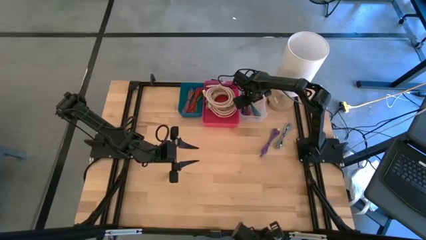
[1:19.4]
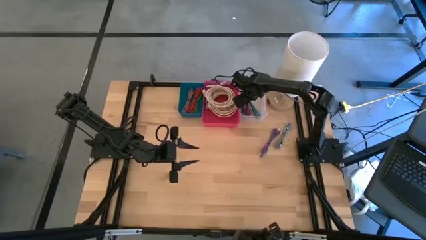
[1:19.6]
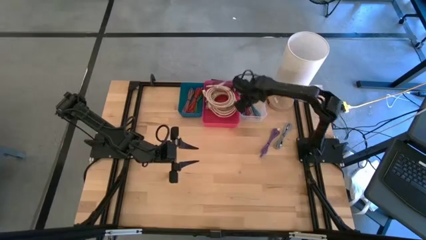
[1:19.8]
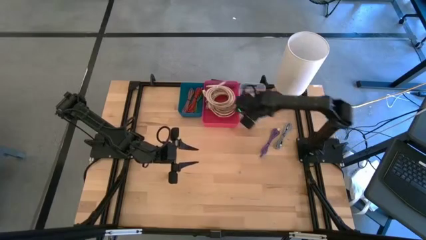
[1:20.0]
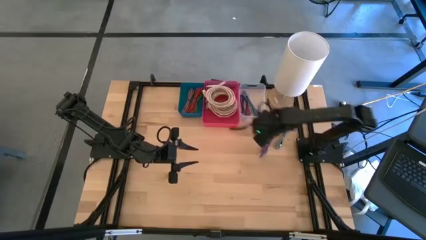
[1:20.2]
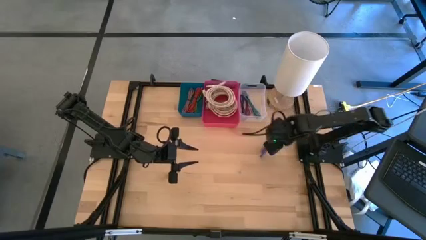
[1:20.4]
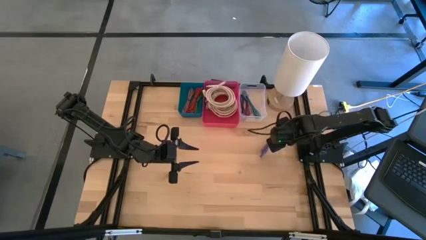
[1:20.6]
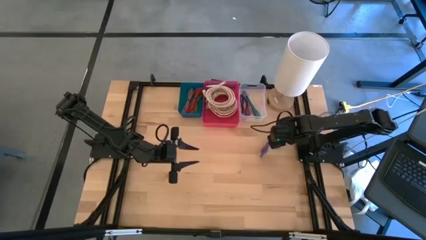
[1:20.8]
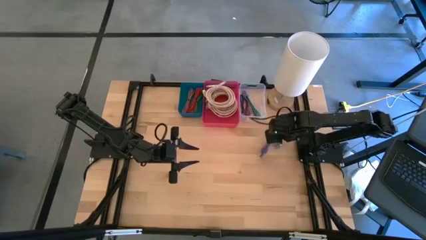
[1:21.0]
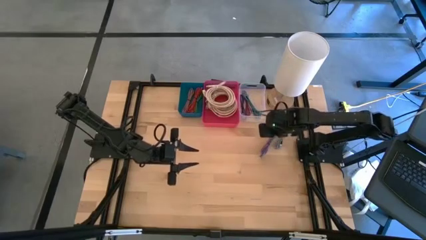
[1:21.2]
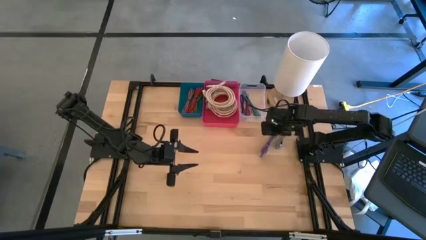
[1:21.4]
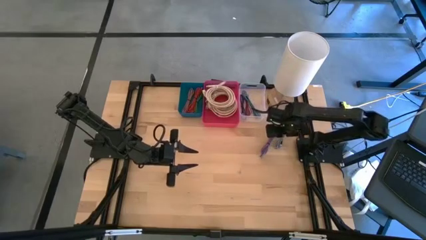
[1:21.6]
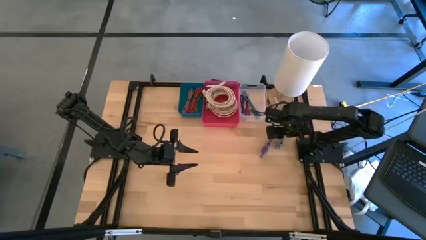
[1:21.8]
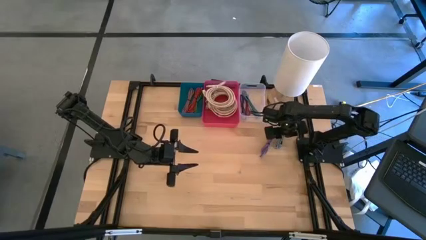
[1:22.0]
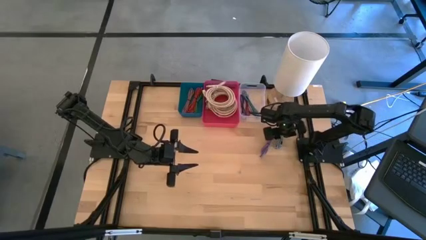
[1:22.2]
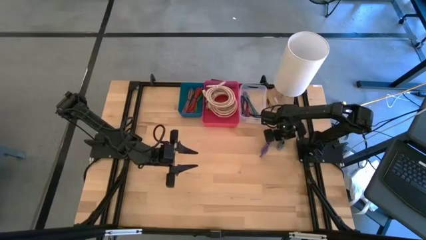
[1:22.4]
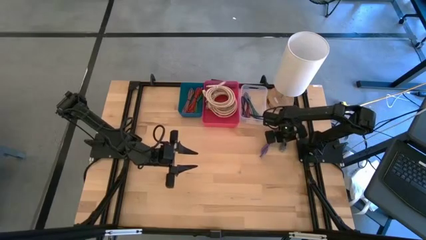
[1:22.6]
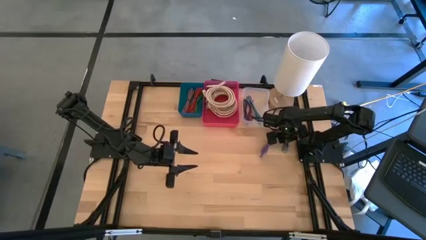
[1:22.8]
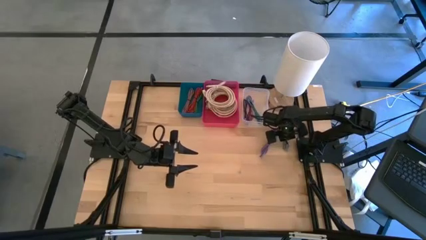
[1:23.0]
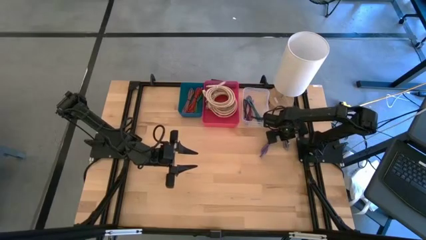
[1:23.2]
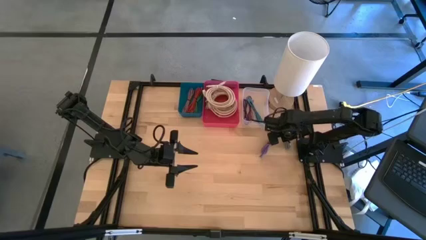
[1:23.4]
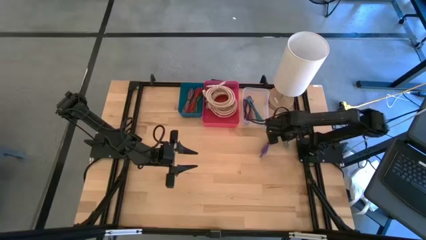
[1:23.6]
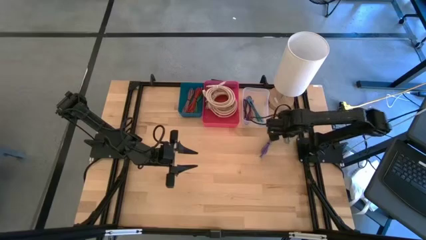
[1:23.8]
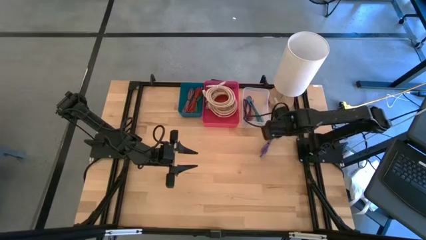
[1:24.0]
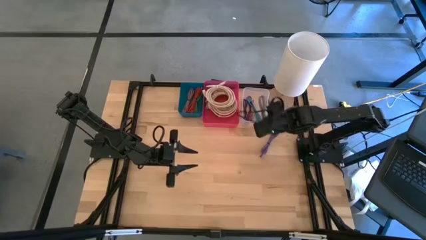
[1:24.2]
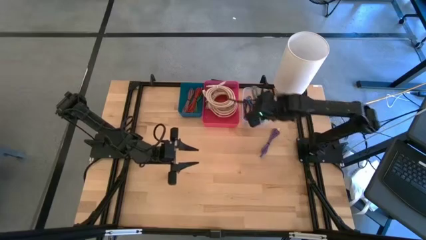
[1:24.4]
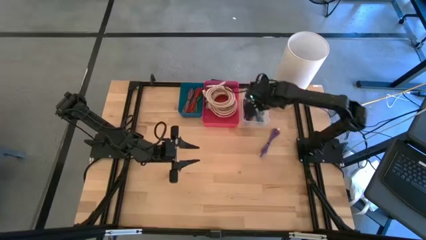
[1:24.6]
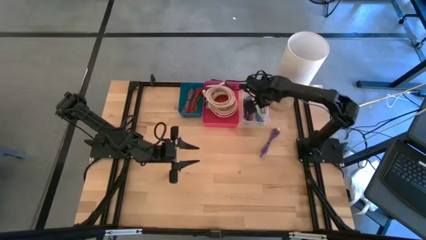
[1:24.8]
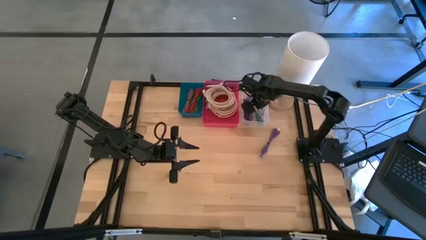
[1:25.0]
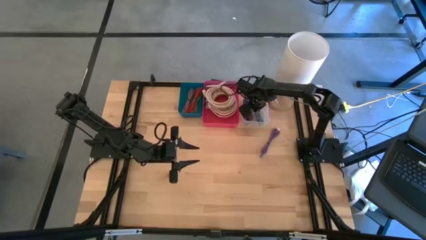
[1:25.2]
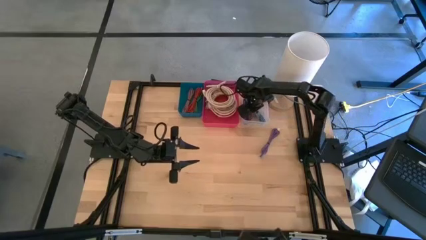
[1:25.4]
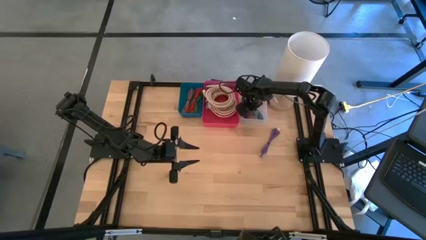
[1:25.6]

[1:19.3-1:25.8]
Task: Pick & Place USB Port
Put the white patterned charger cable into the transparent bin

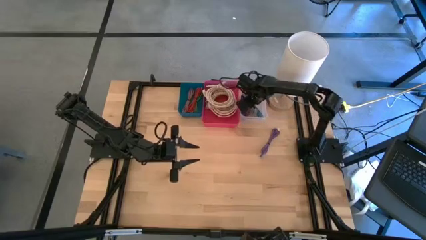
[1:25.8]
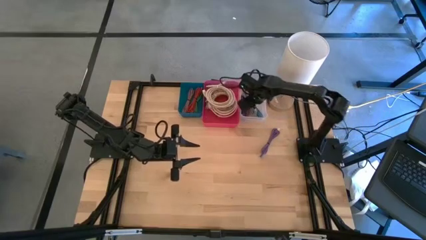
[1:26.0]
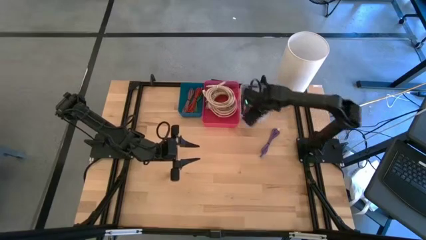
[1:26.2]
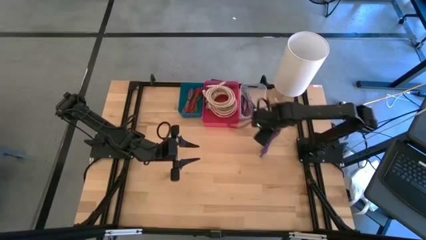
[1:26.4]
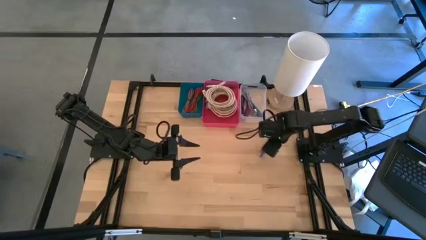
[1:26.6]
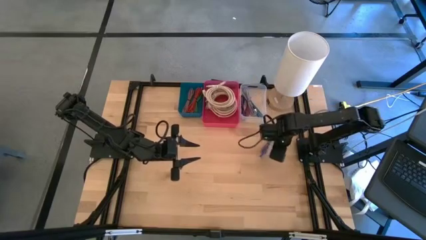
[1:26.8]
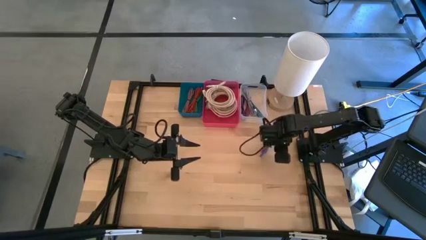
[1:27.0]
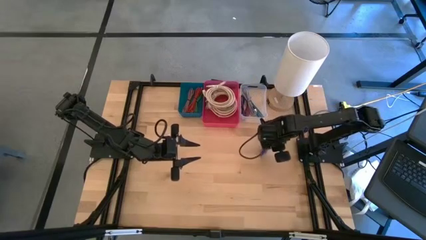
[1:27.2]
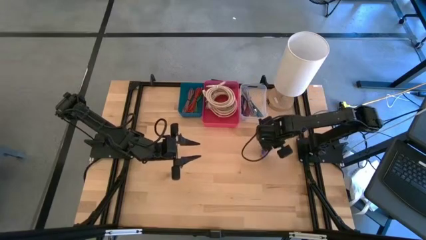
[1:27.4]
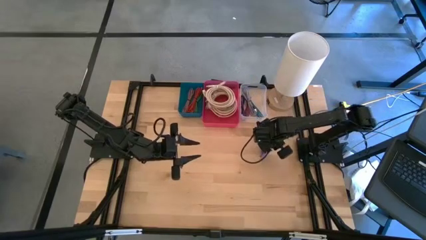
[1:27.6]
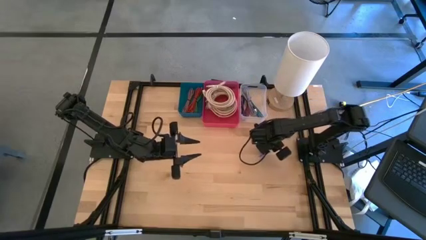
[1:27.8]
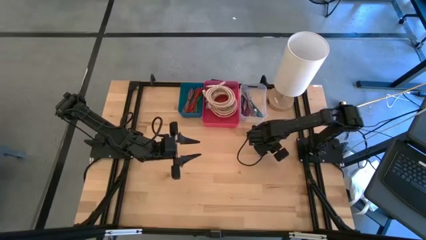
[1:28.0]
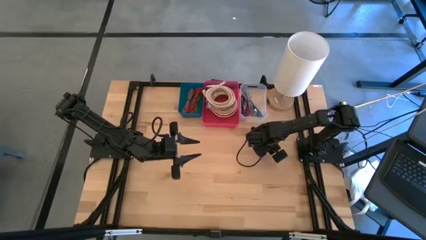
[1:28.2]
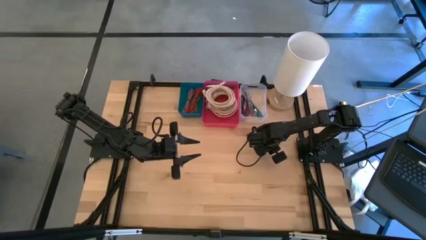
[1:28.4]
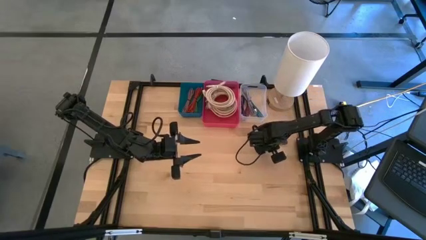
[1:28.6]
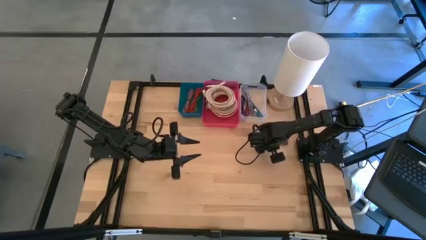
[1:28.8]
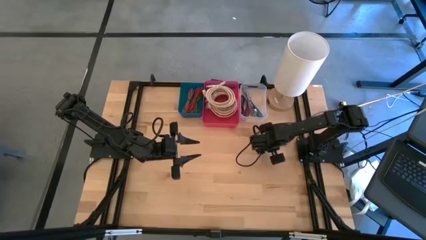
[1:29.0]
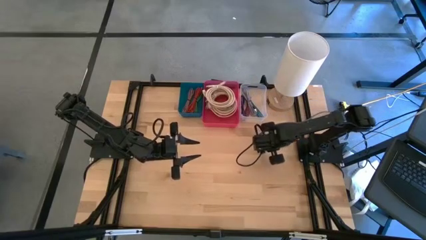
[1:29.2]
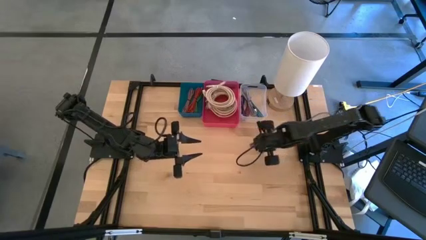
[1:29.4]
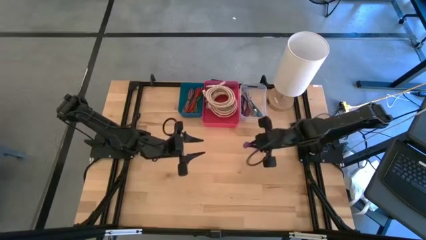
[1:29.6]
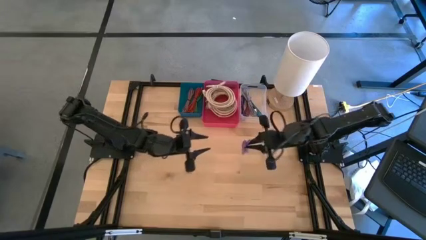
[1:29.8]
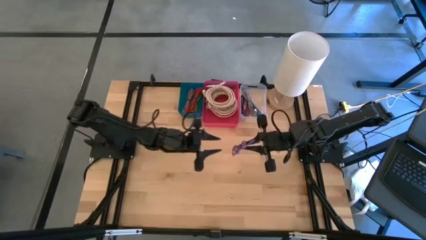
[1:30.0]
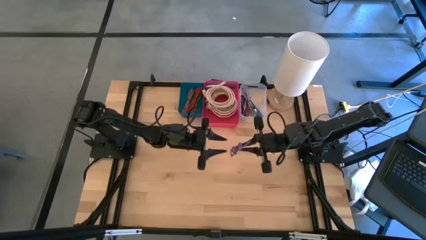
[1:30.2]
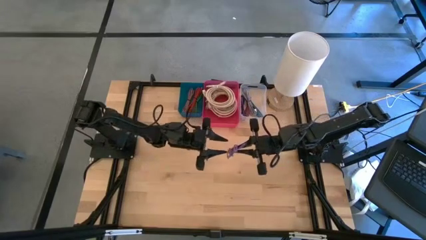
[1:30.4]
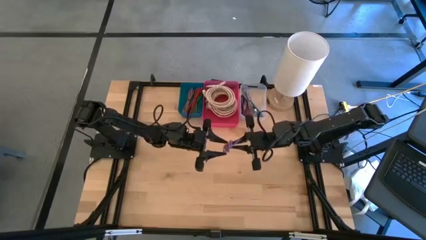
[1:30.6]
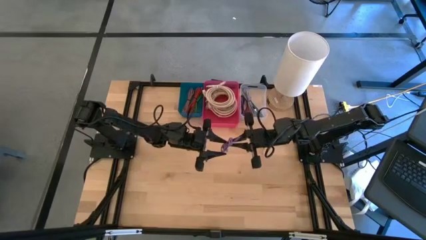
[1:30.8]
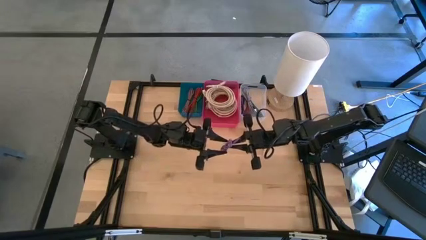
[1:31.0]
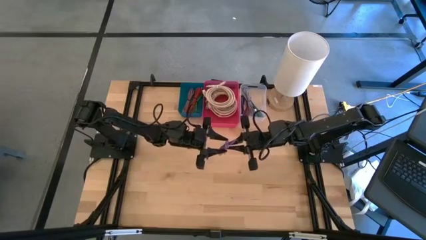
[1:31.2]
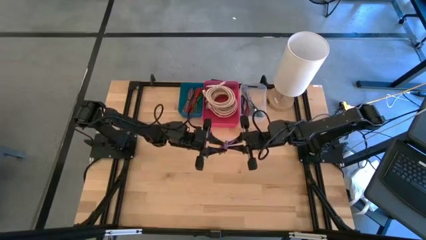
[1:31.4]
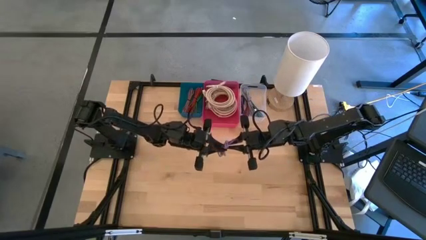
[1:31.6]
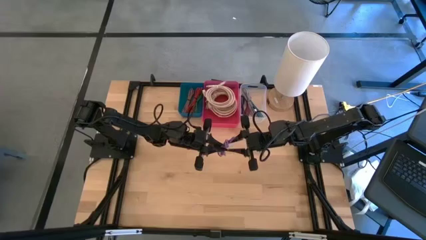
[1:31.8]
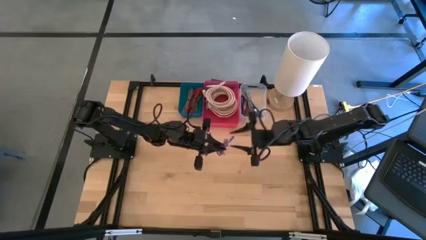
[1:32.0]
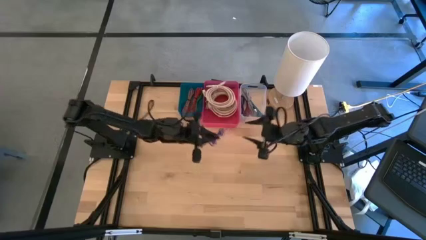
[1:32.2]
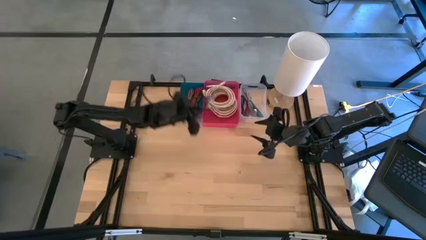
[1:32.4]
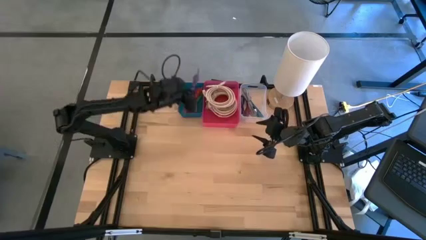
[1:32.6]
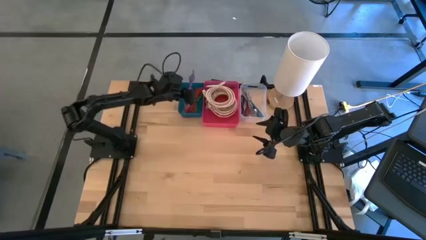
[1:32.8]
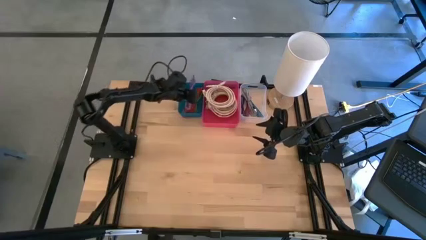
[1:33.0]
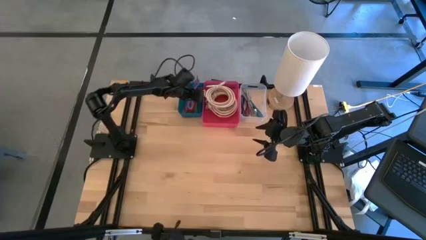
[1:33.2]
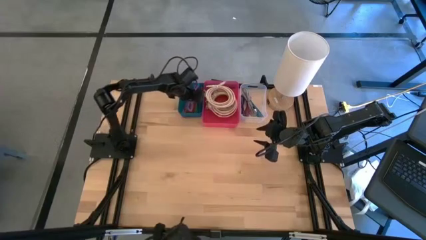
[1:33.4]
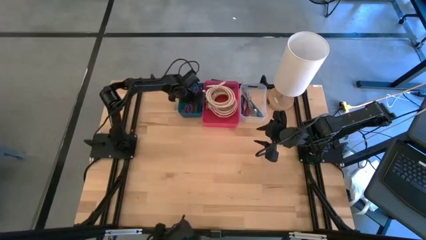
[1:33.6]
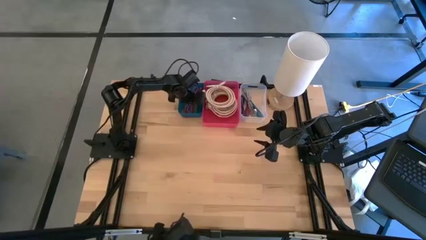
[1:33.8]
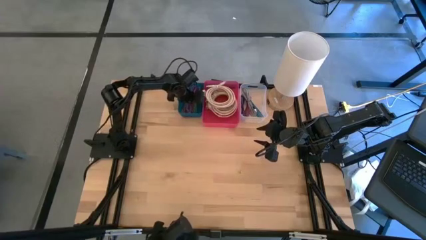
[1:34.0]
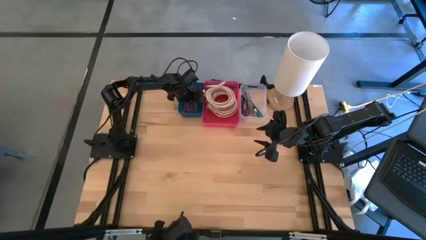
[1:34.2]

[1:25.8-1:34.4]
Put the purple charger cable into the blue bin

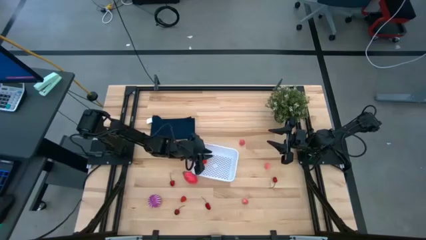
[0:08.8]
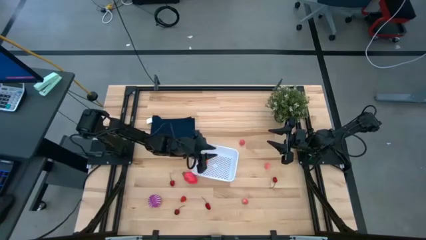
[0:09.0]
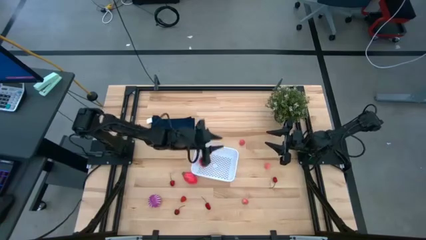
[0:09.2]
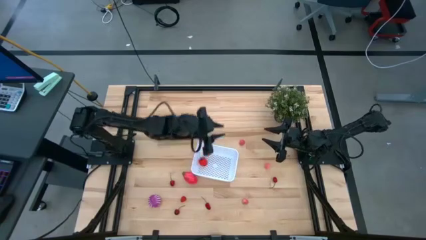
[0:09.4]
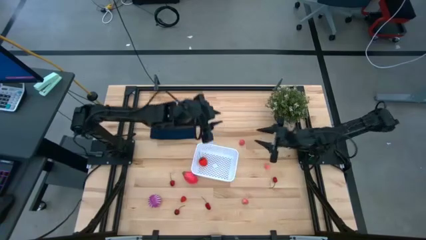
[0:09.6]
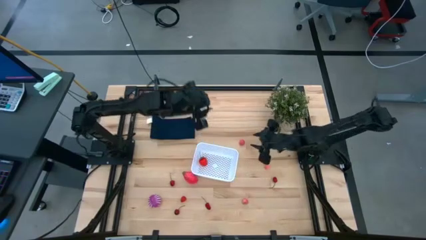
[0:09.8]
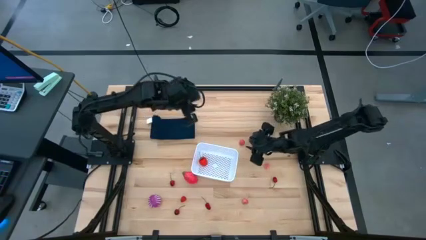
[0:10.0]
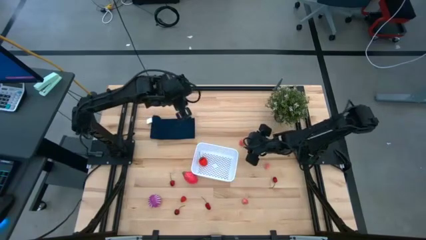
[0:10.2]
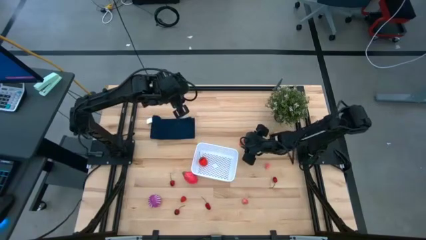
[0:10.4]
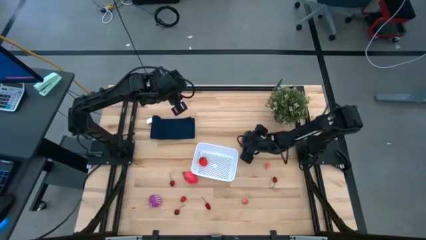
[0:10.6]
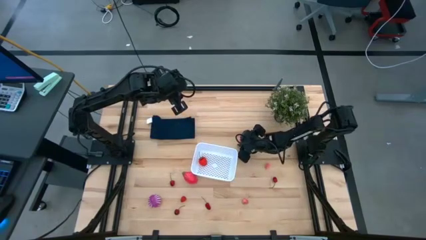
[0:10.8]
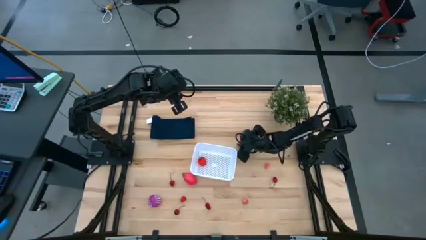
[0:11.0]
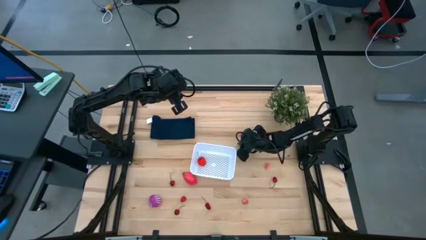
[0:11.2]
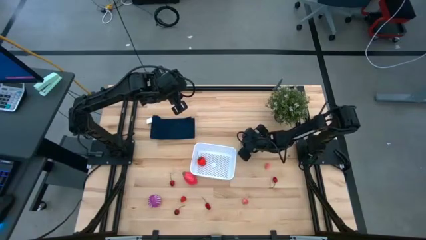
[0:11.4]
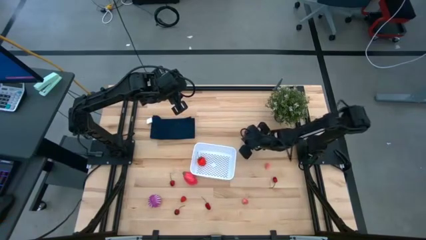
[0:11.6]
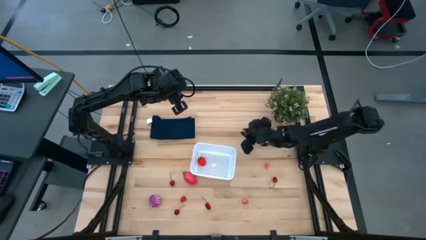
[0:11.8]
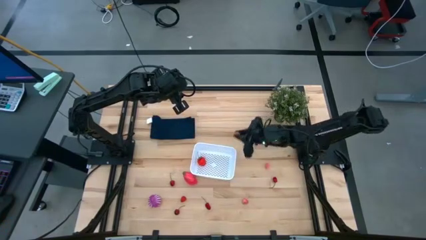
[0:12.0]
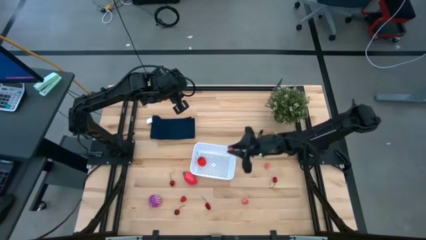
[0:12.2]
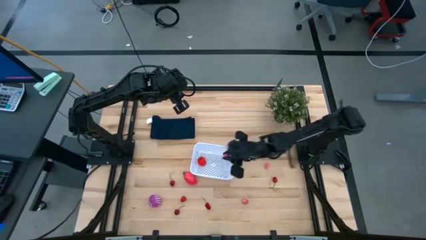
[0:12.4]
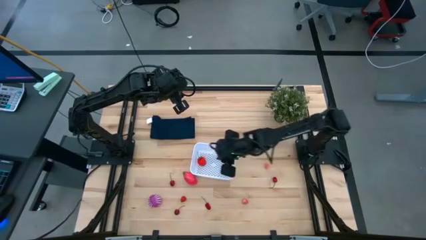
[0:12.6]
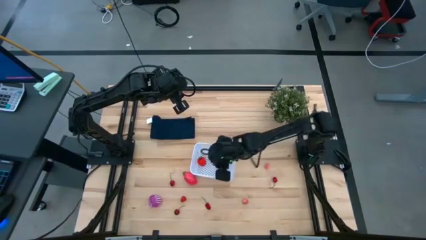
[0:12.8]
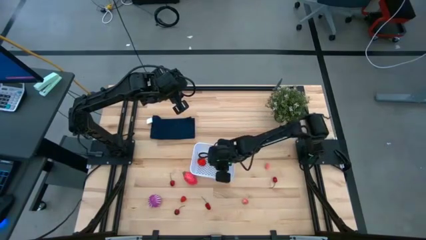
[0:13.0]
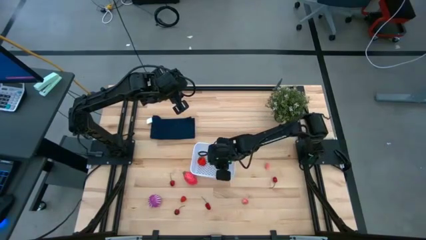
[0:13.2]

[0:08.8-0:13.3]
Task: Pick and placing Produce into tupperware
Put the peach into the white bin
